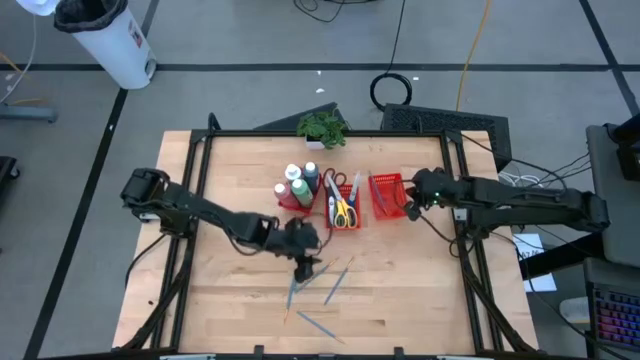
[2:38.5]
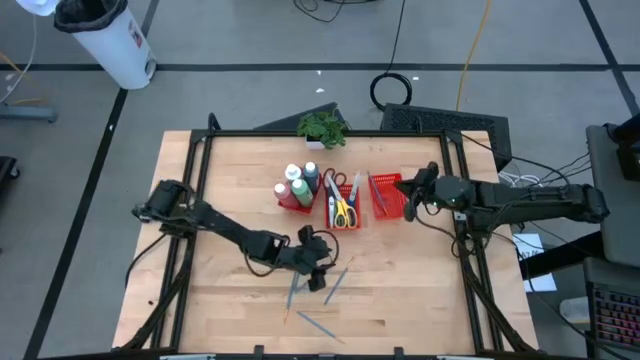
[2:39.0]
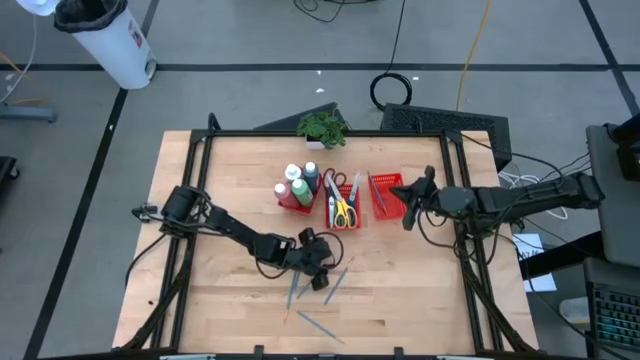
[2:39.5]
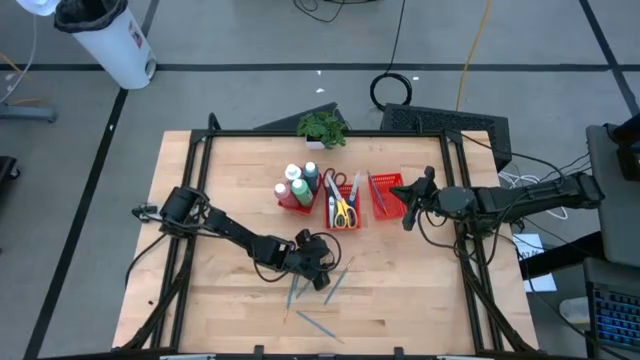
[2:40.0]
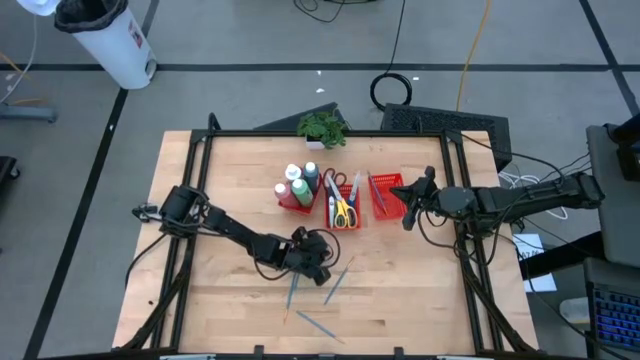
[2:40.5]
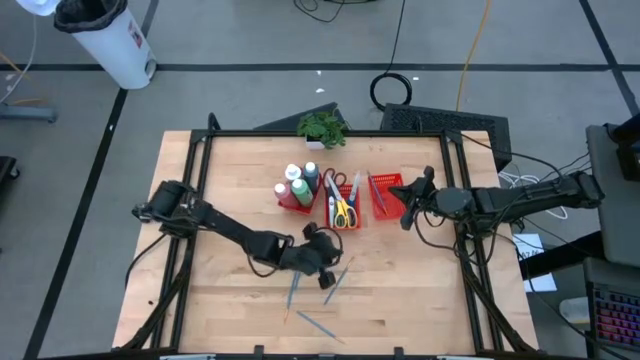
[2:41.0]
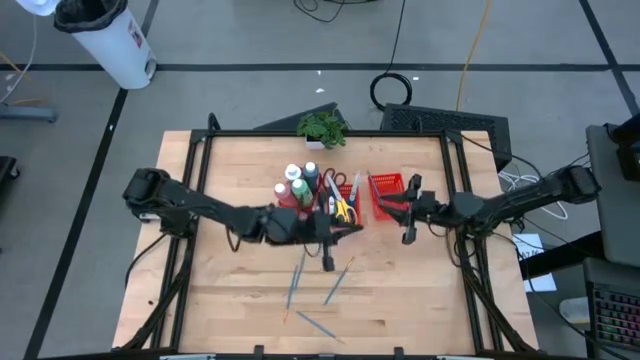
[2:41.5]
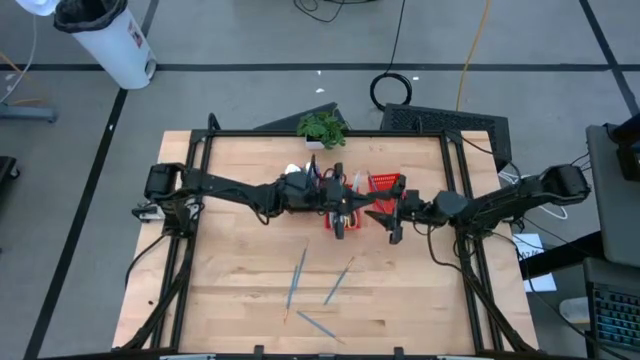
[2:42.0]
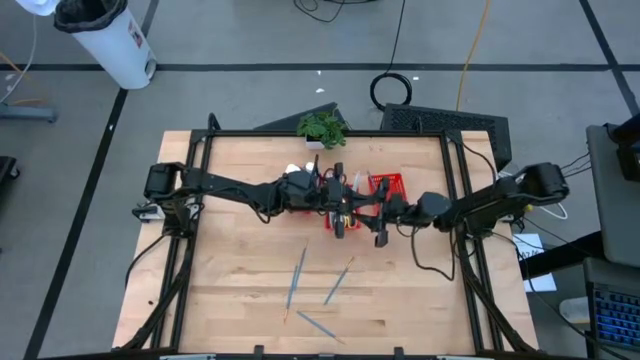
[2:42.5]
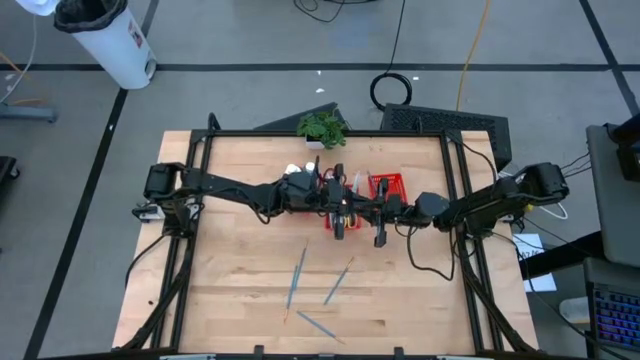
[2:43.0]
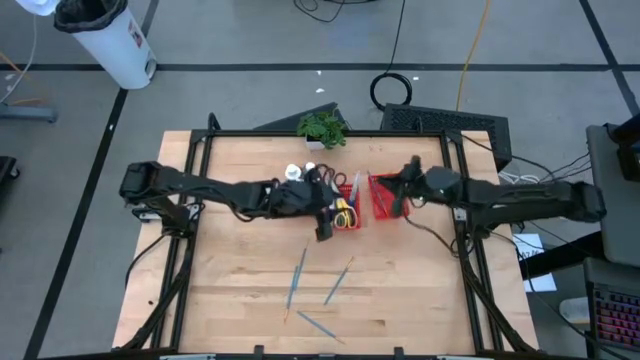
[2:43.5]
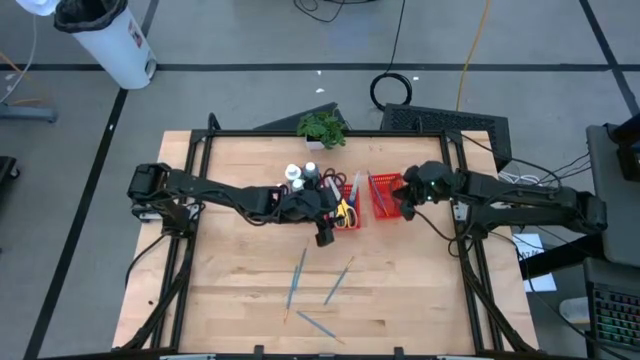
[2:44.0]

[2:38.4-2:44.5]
Task: Pick & Place Paint Supplies
Put the blue paint brush into the right red bin

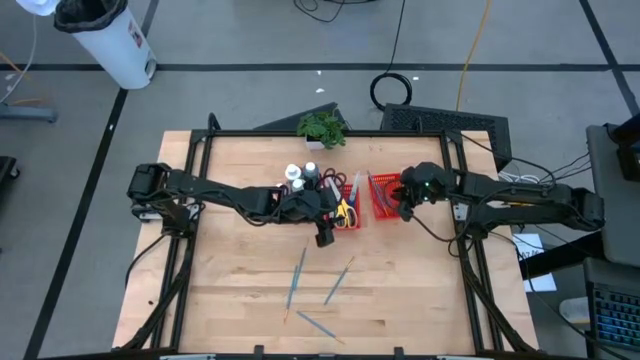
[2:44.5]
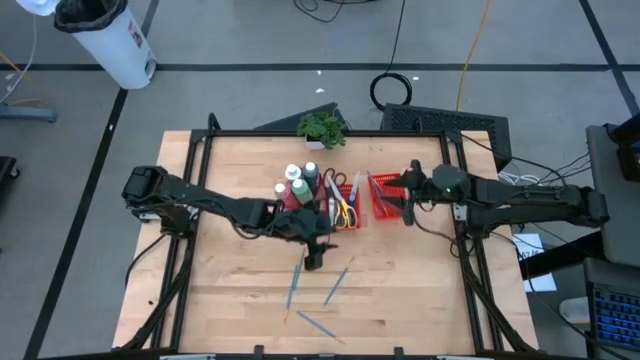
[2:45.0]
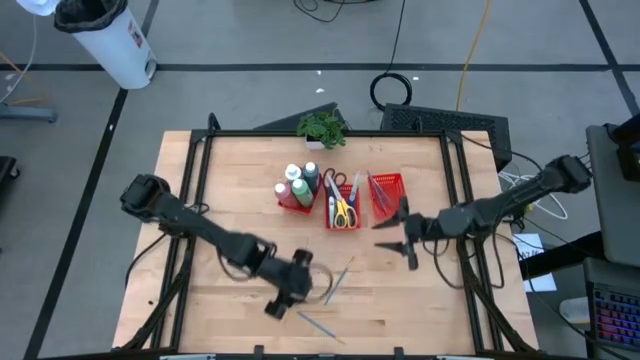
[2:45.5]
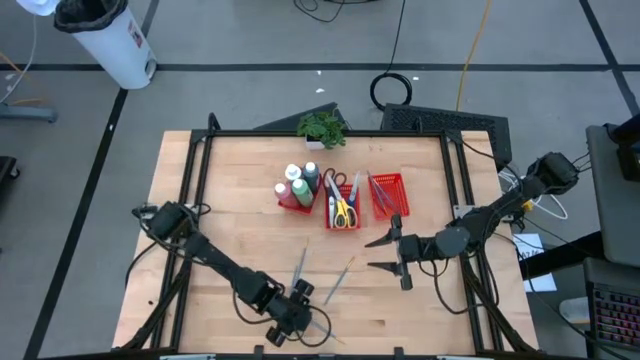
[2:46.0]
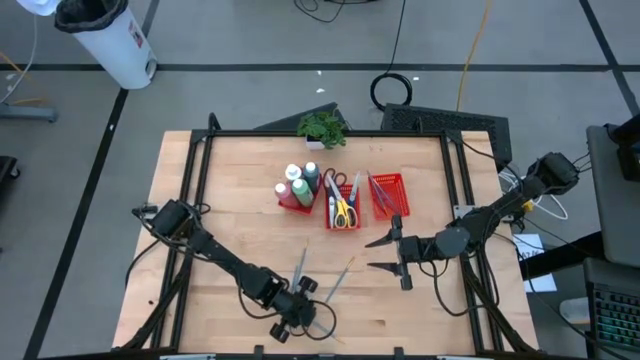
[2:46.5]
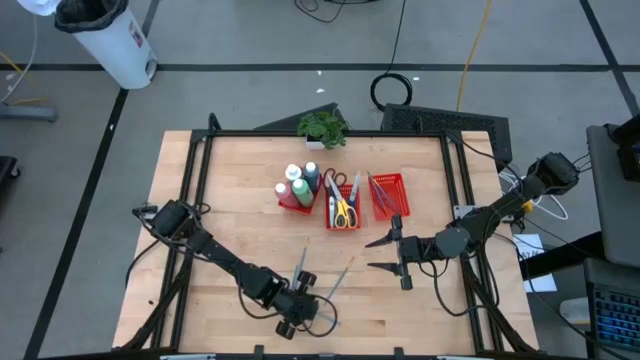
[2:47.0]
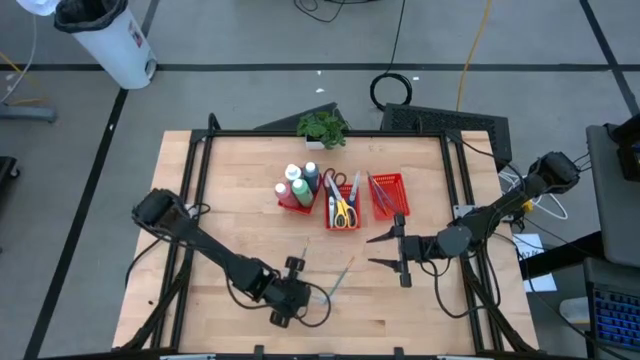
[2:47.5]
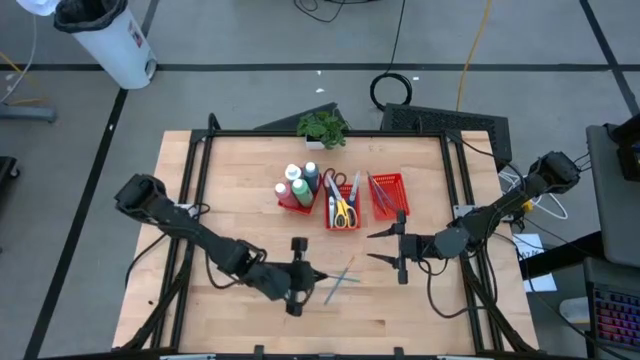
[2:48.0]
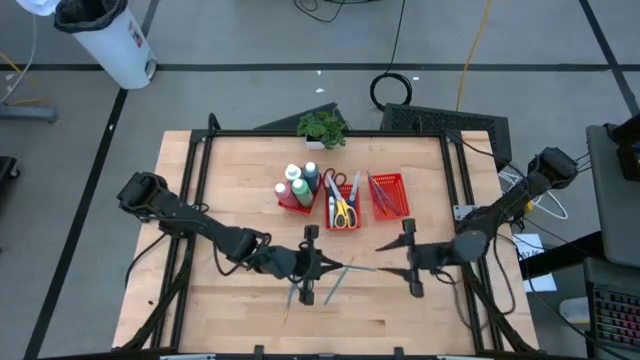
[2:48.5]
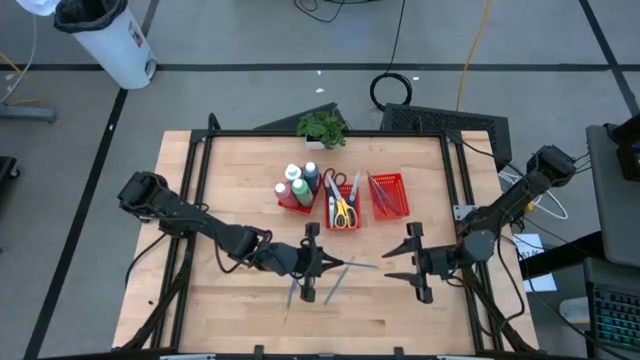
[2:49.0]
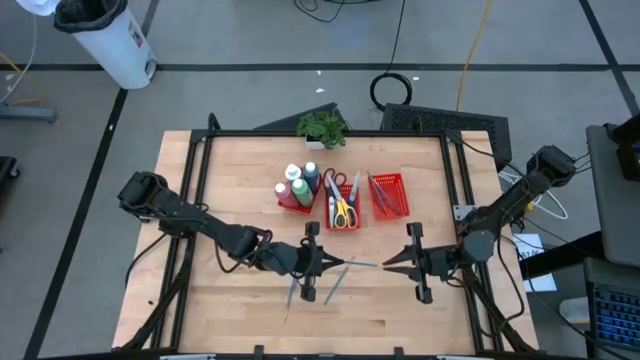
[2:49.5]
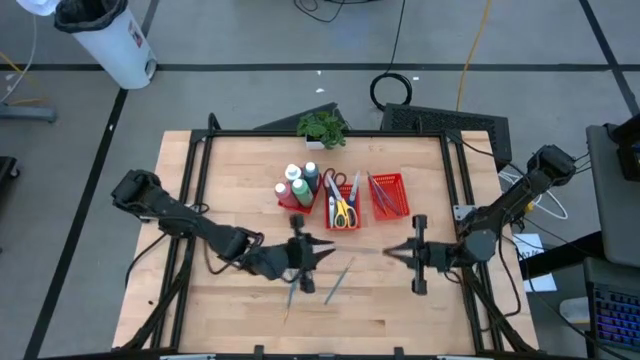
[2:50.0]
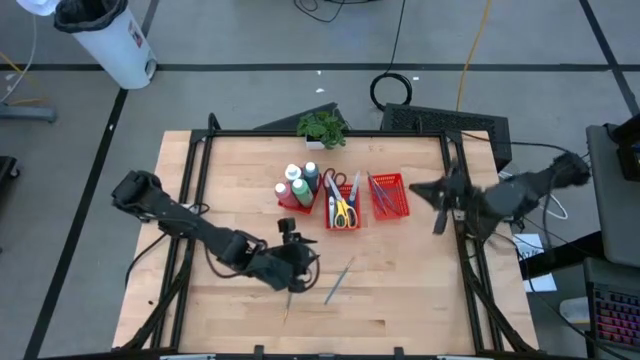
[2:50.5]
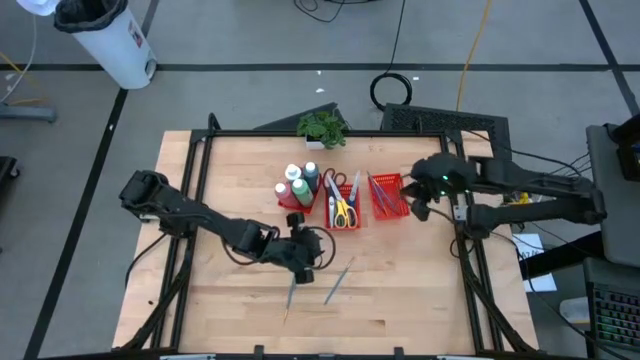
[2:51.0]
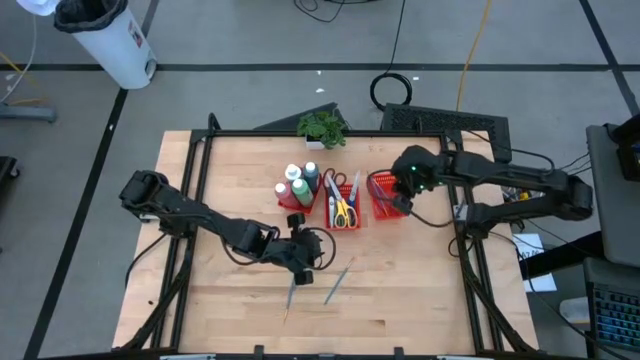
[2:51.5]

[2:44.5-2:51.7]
Put the blue paint brush into the right red bin

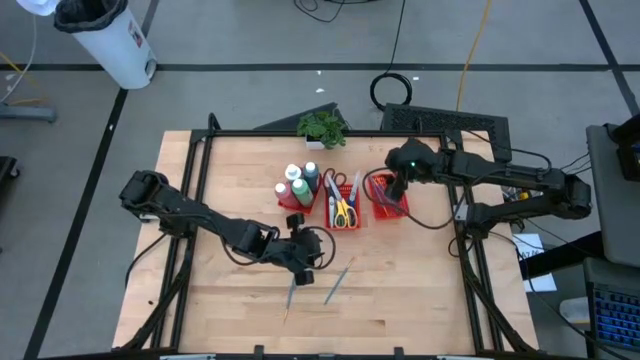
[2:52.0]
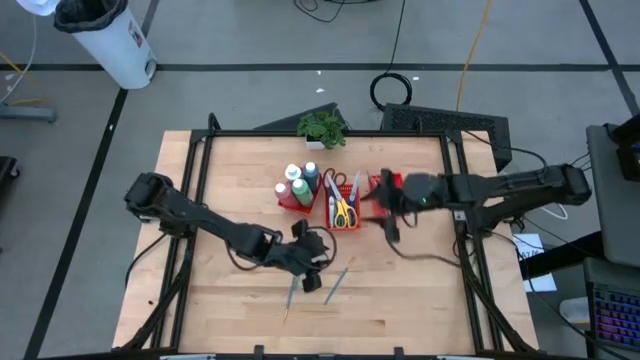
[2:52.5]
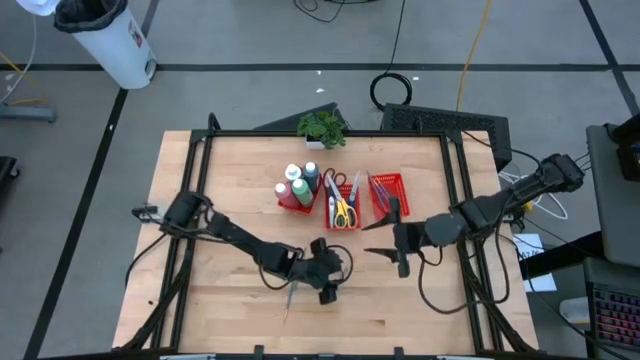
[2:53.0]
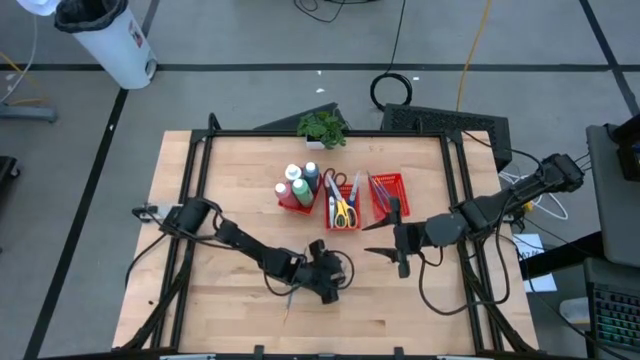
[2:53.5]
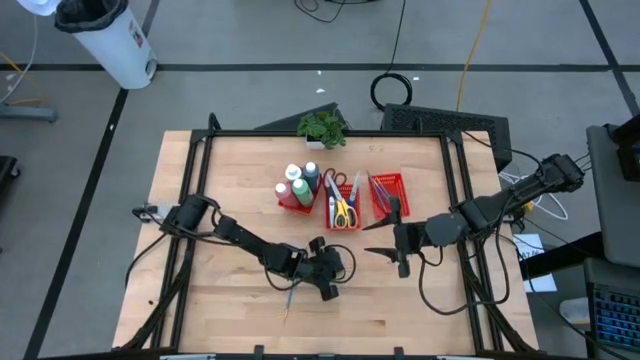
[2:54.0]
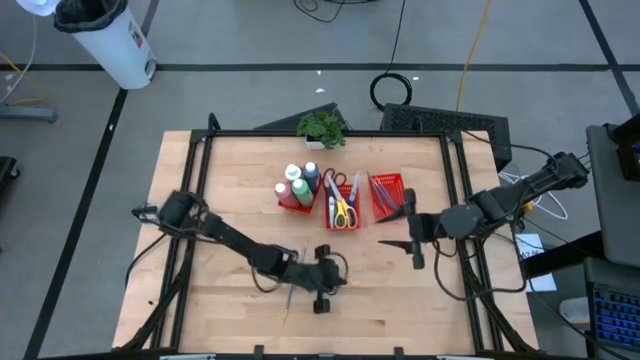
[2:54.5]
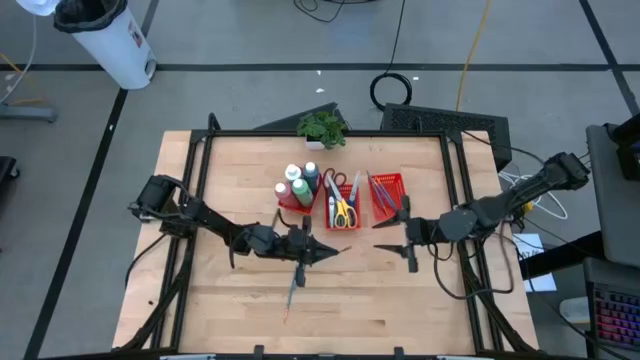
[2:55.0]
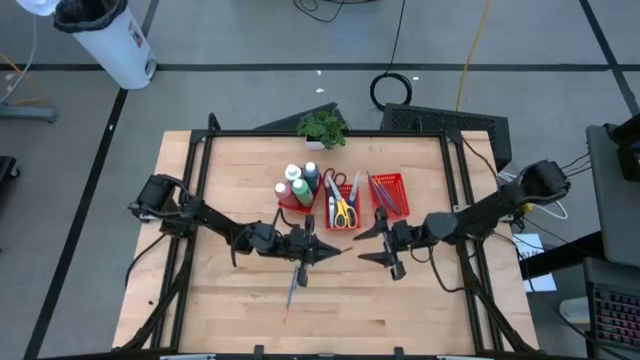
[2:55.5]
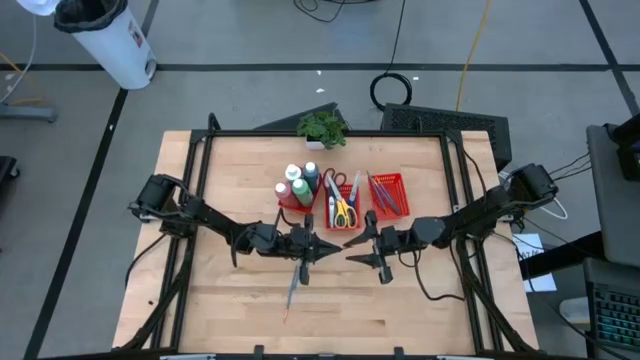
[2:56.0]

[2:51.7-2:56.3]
Put the blue paint brush into the right red bin

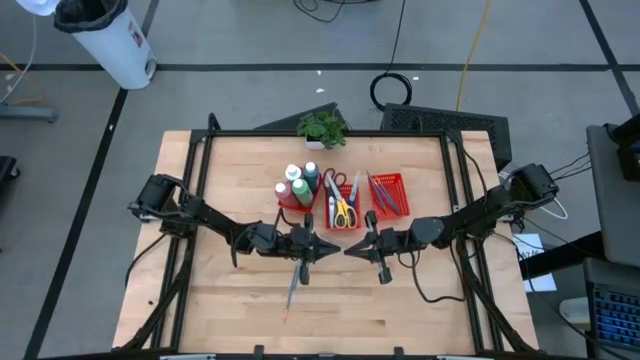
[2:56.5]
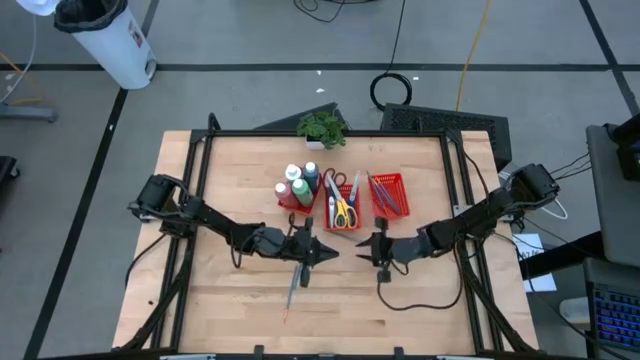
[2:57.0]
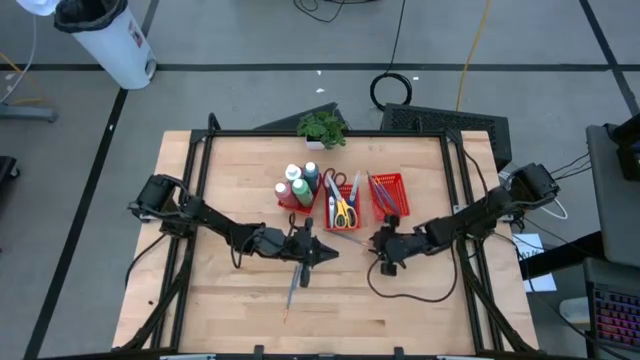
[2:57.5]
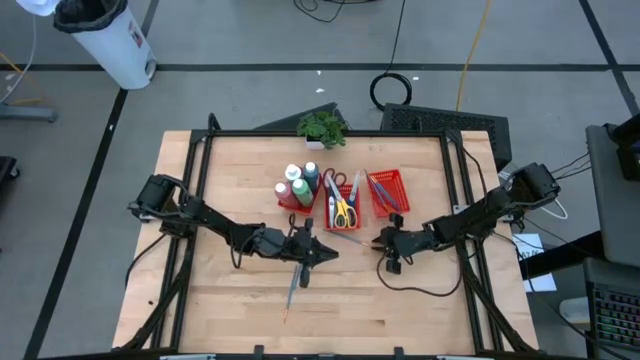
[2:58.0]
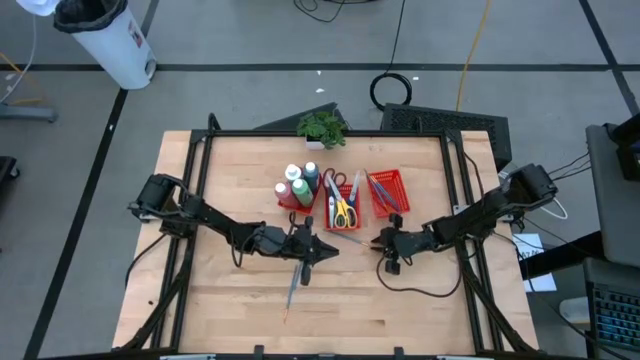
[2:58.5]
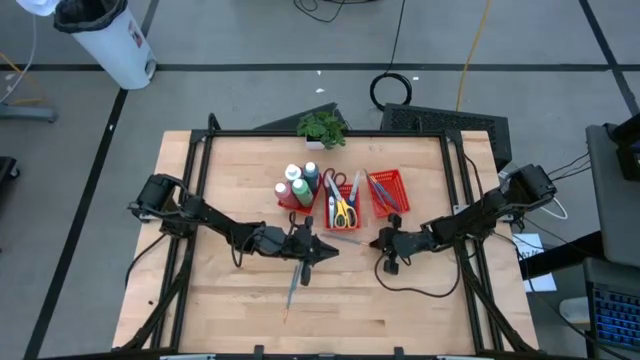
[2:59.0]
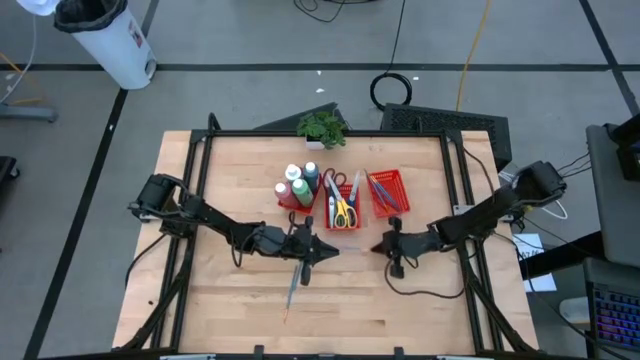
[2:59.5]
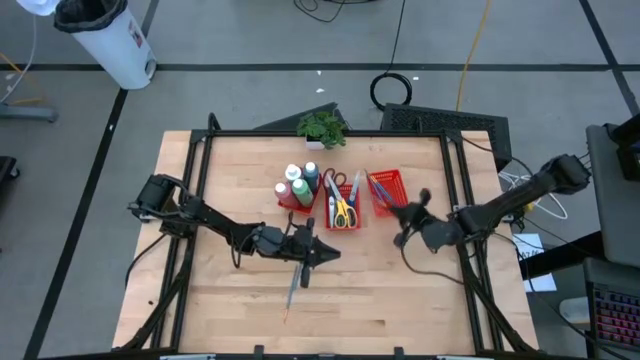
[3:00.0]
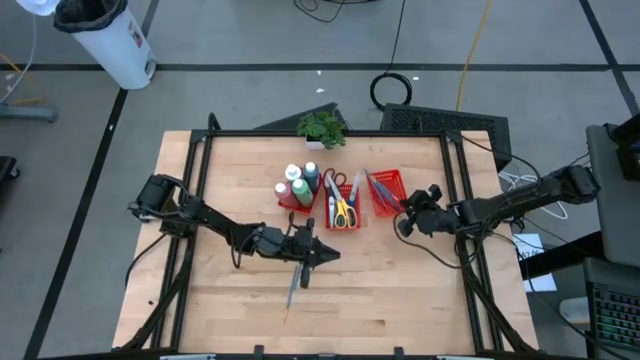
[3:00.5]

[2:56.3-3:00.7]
Put the blue paint brush into the right red bin
